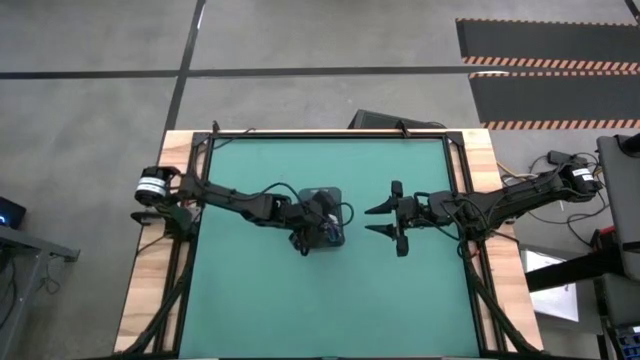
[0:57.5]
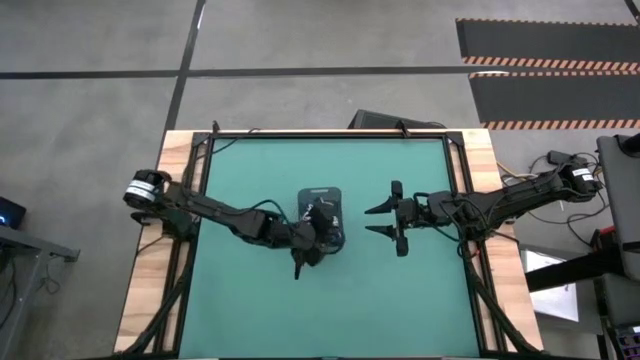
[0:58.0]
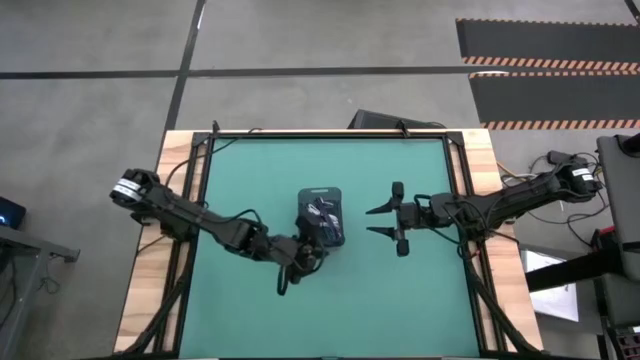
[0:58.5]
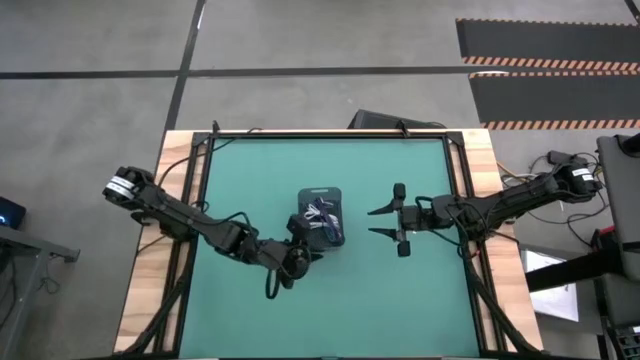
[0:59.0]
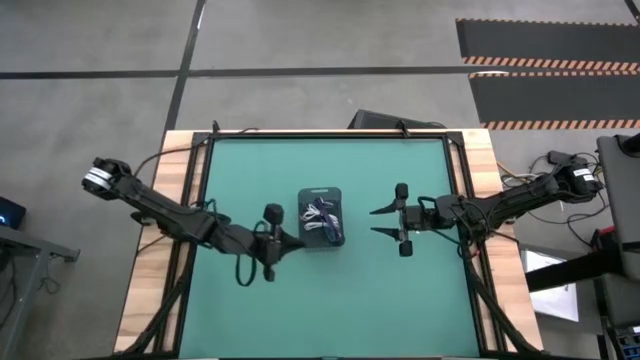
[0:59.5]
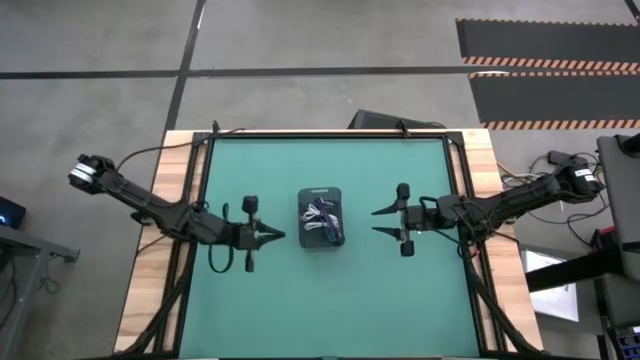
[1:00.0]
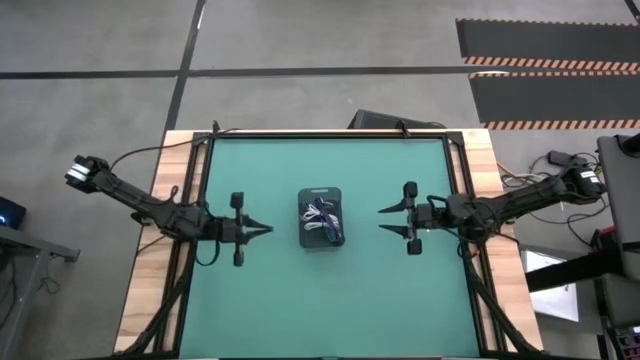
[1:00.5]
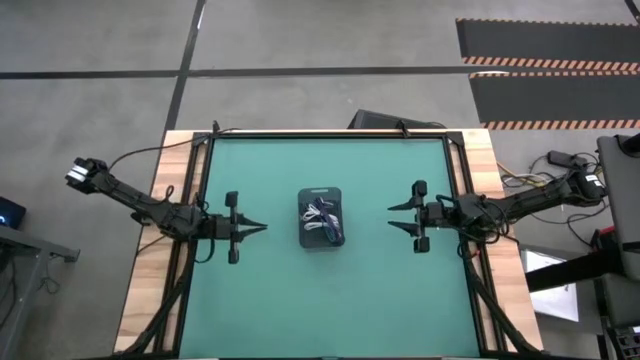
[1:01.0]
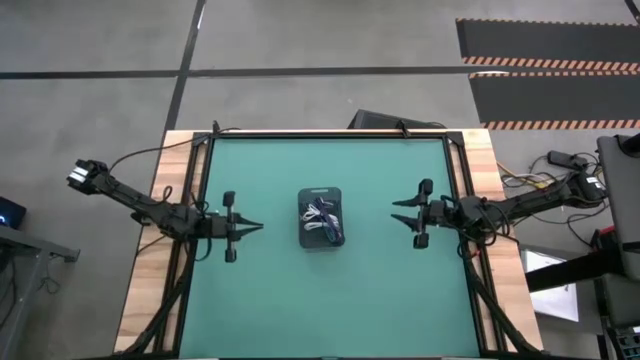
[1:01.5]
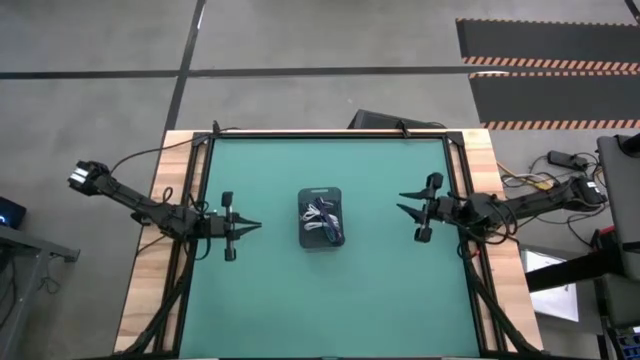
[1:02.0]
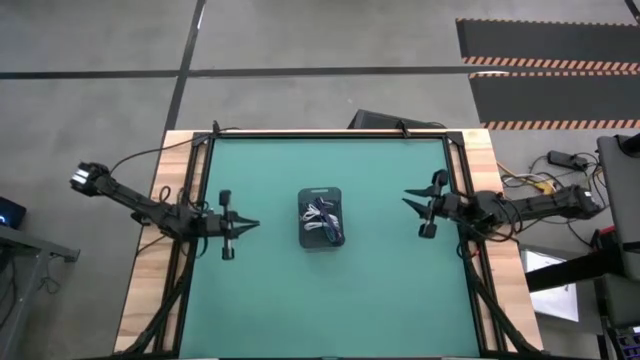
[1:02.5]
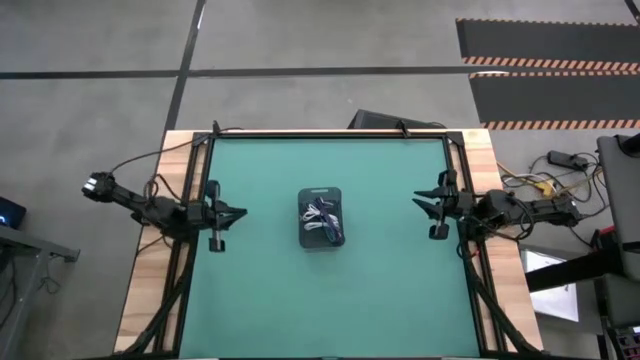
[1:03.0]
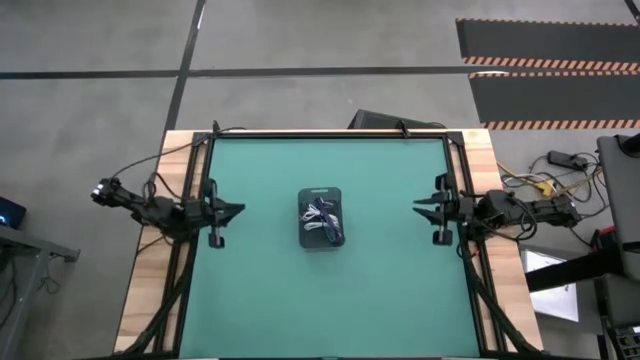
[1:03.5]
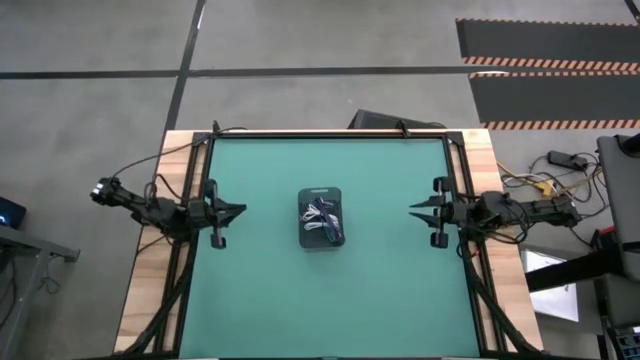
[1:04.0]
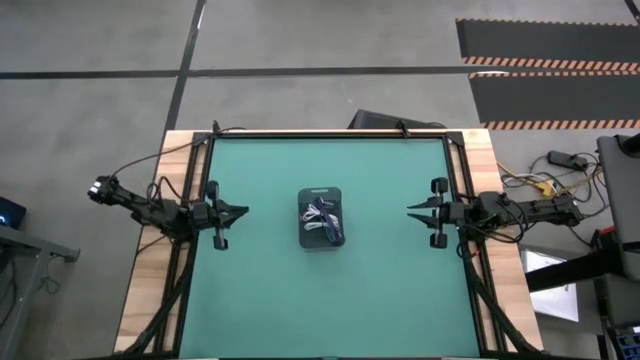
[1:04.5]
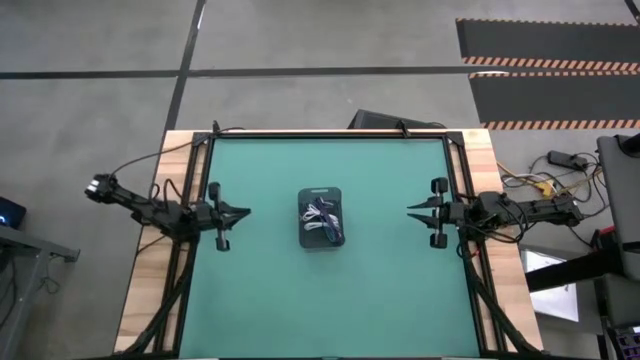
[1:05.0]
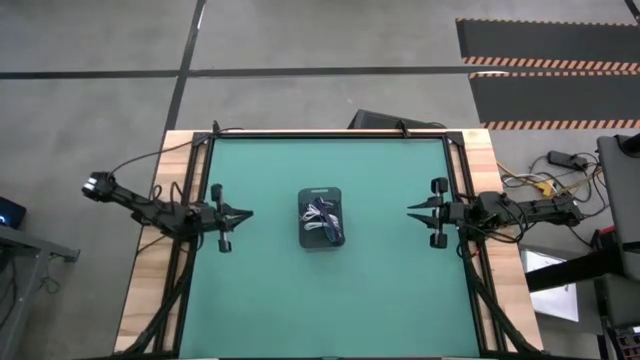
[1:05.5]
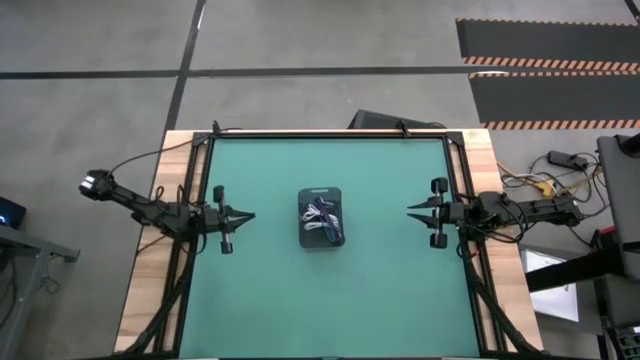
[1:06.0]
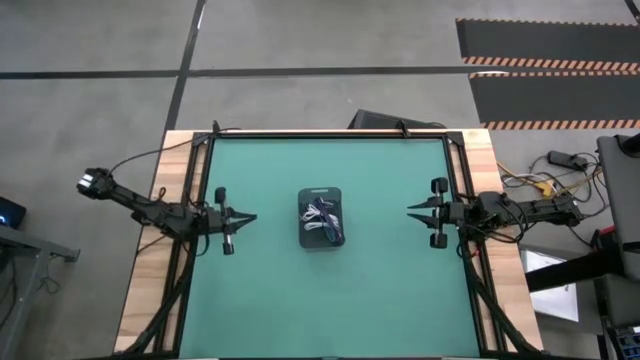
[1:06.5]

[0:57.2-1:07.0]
Task: Pick and place USB-C Cables
Return to Home Position

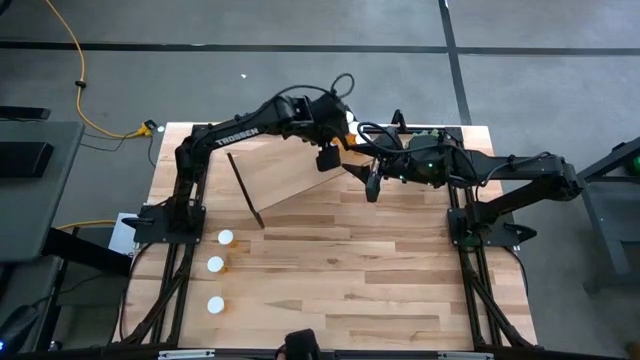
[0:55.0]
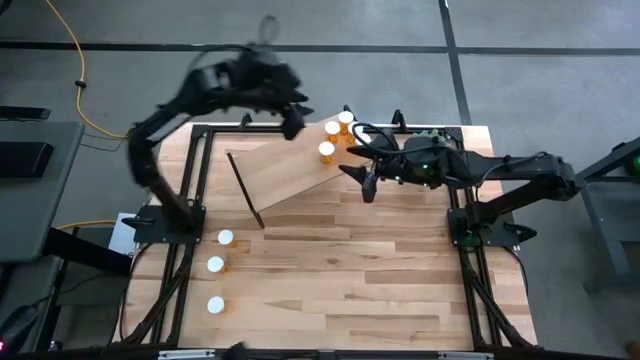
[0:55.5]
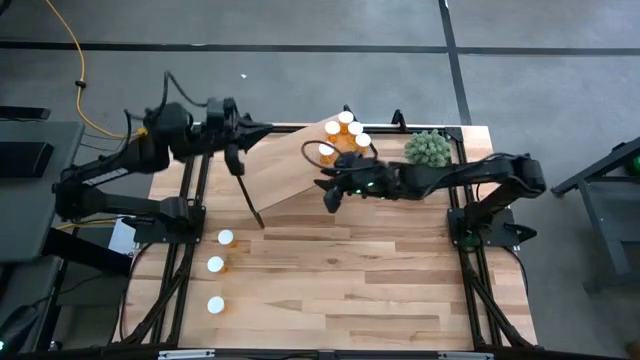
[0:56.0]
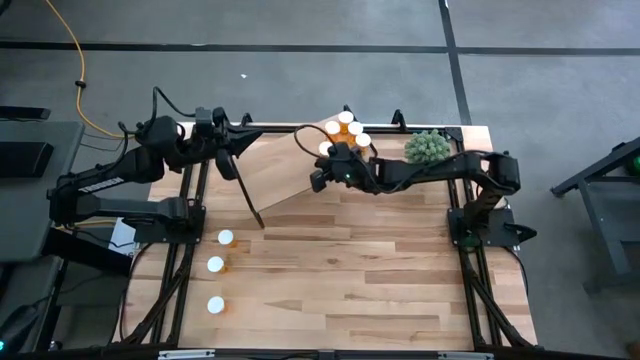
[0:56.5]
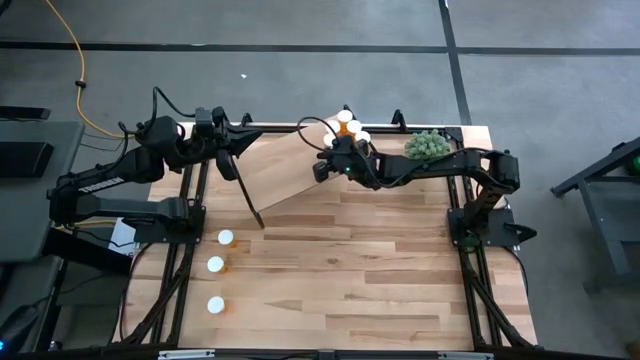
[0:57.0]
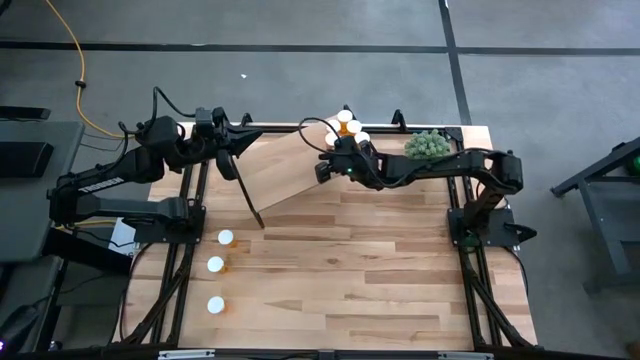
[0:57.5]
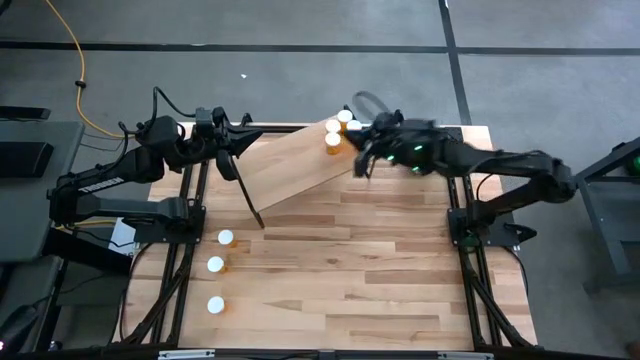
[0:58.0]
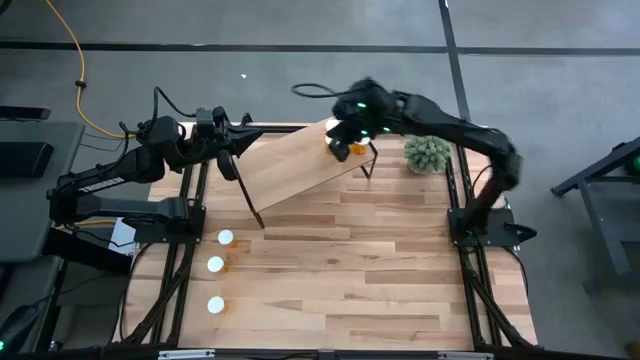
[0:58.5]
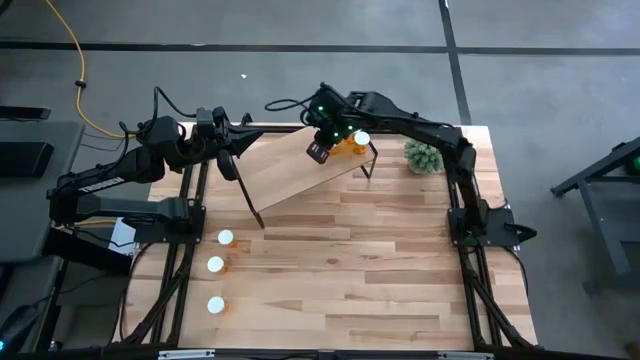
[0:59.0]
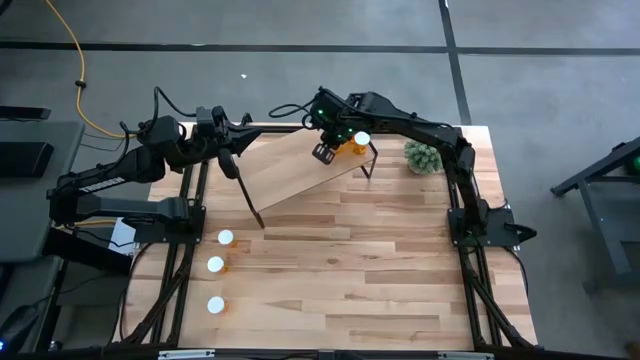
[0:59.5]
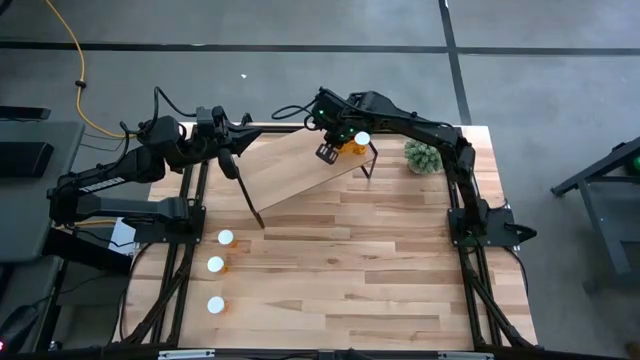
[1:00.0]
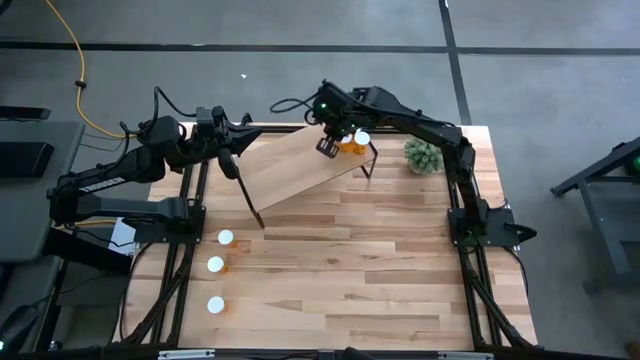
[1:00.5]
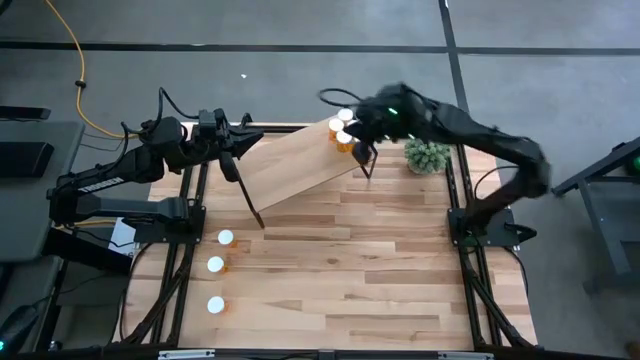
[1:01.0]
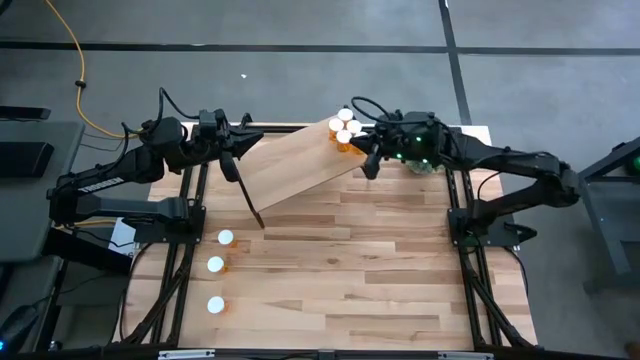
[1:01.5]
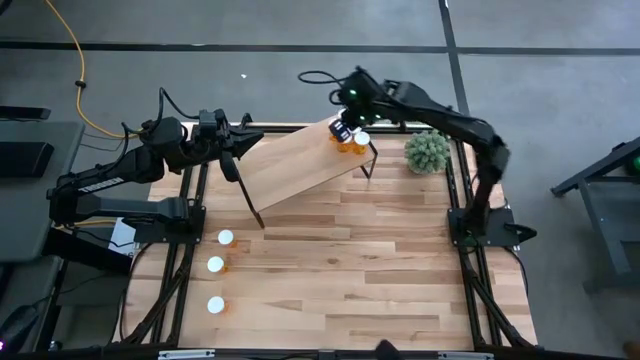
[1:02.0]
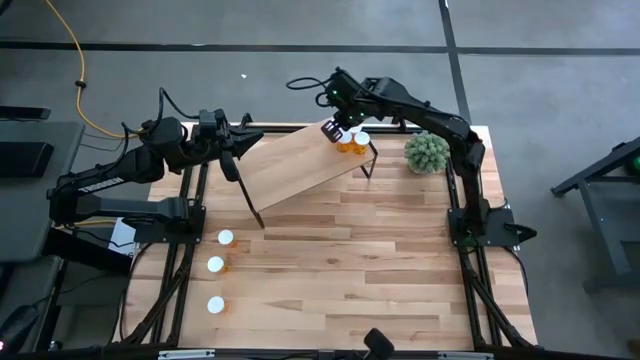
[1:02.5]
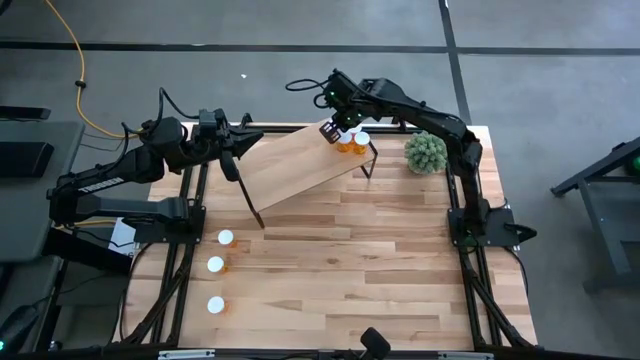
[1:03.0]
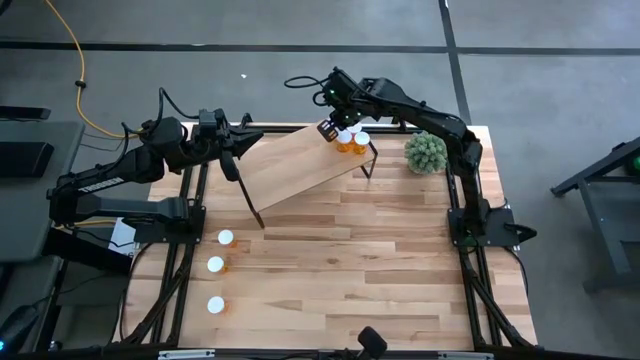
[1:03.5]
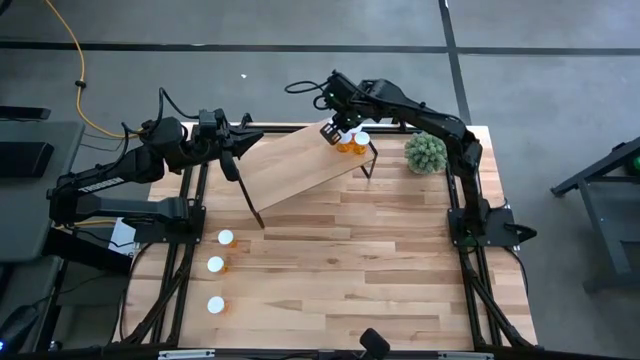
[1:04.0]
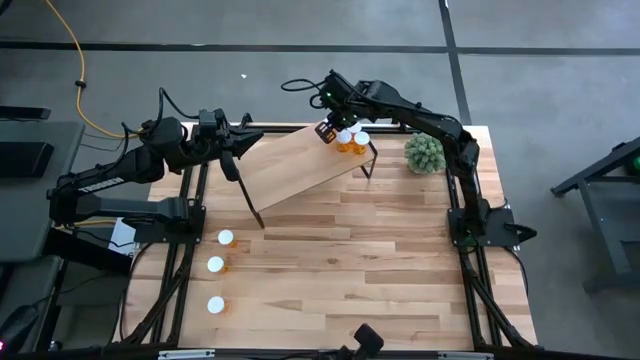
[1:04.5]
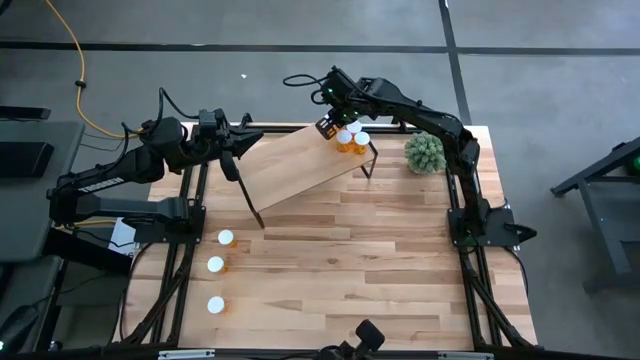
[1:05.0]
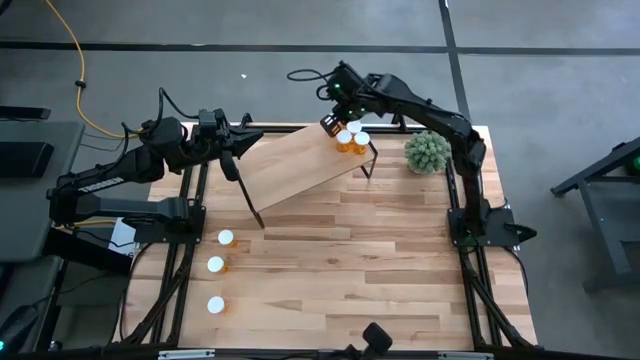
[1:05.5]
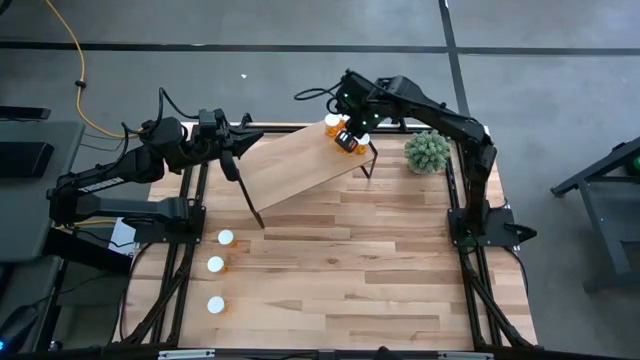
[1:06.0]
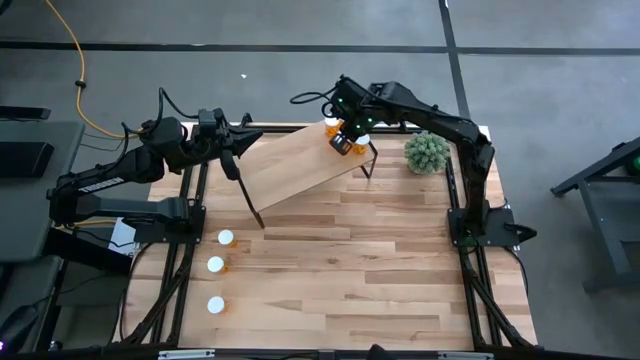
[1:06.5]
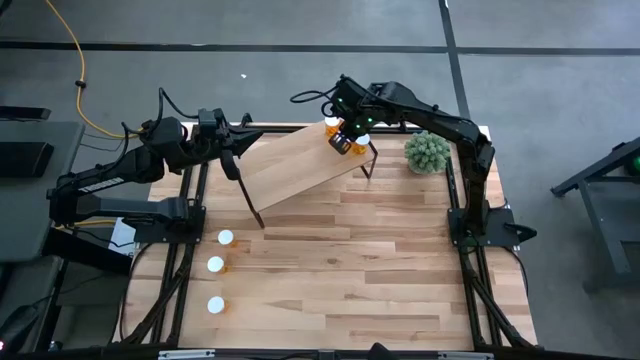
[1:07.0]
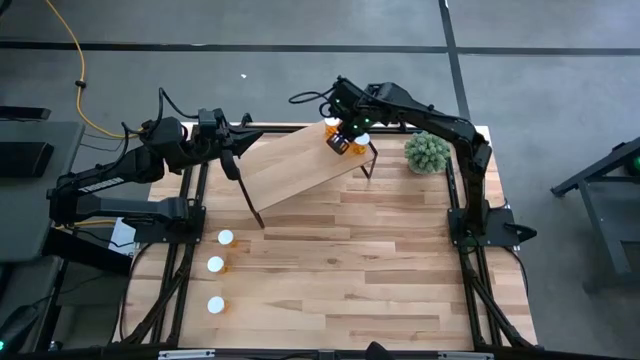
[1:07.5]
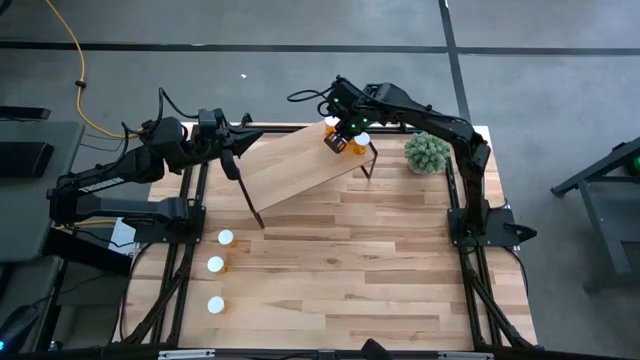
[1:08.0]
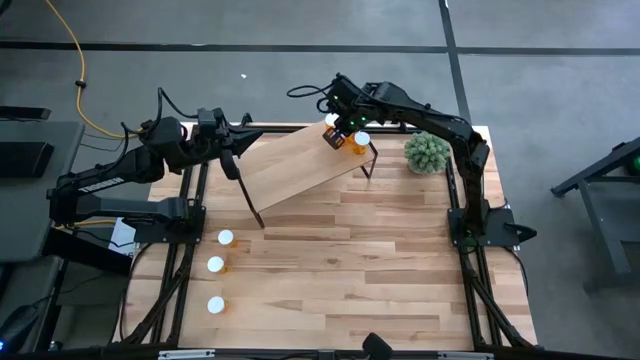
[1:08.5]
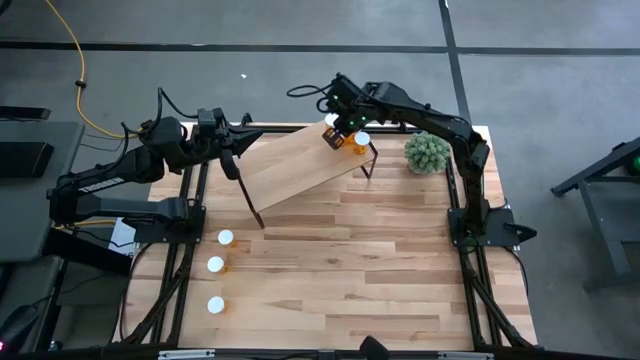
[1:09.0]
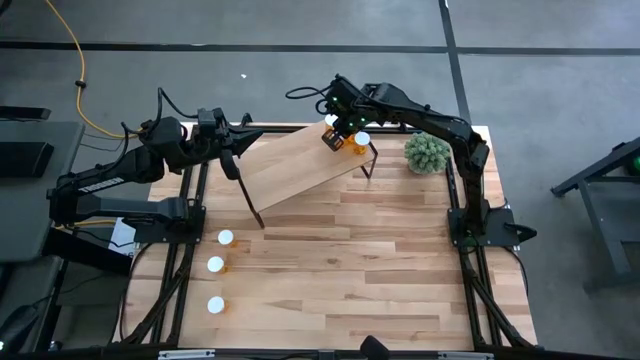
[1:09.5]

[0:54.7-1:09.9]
Task: Pick and place medicine bottles onto shelf by color
Adjust the pill bottles on the shelf
